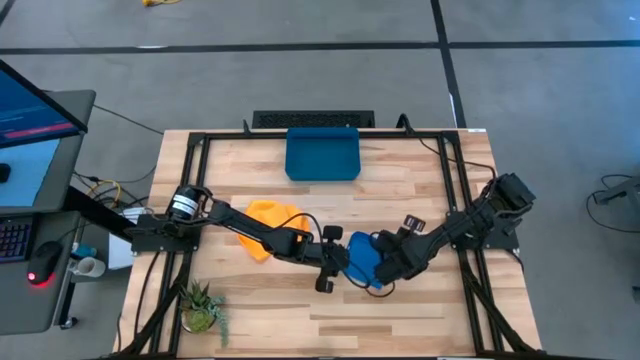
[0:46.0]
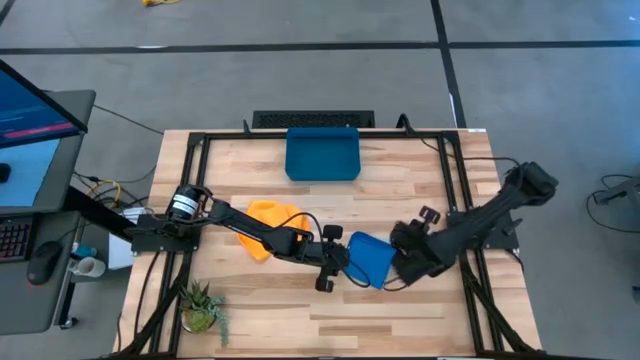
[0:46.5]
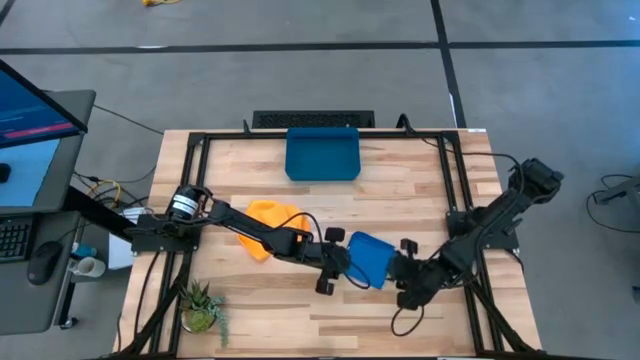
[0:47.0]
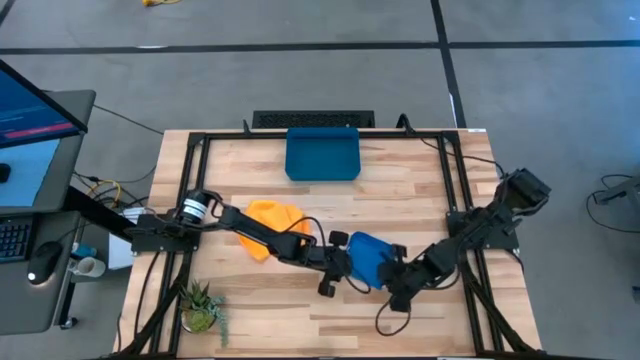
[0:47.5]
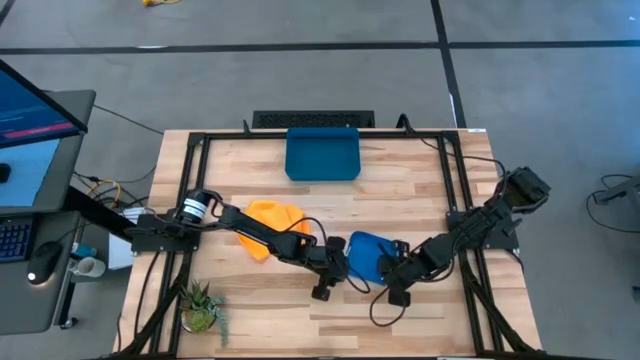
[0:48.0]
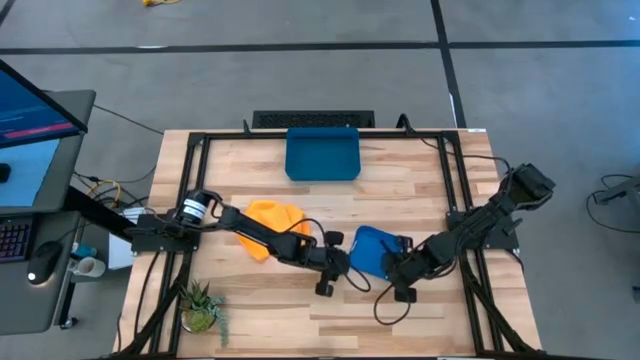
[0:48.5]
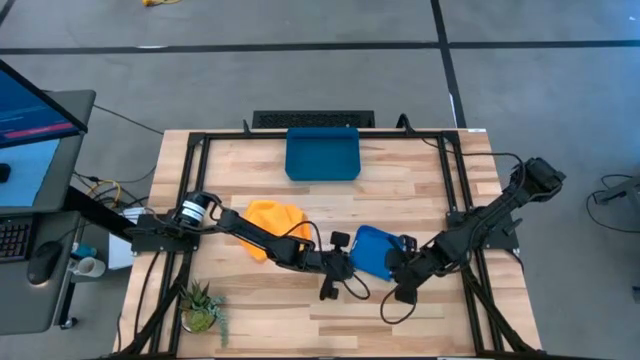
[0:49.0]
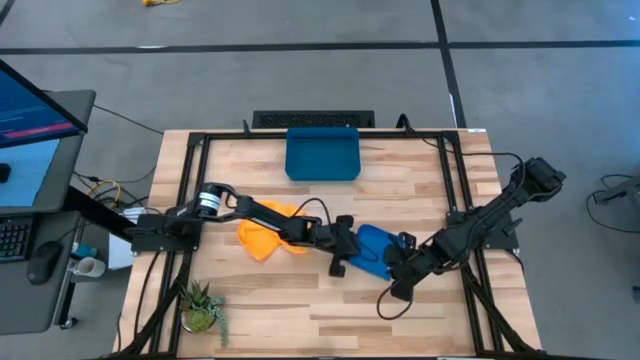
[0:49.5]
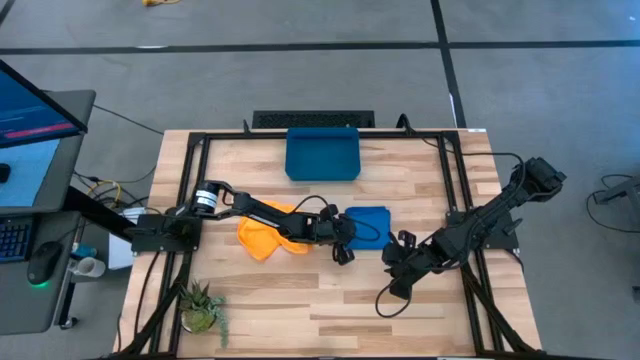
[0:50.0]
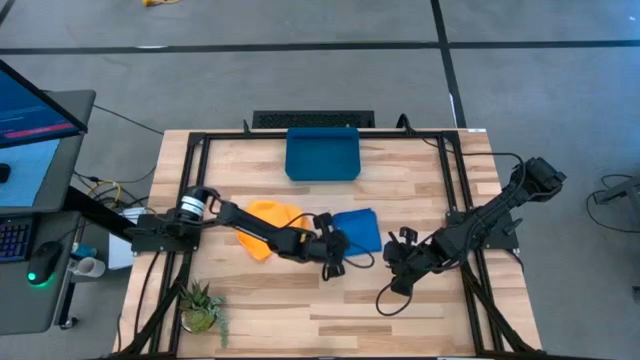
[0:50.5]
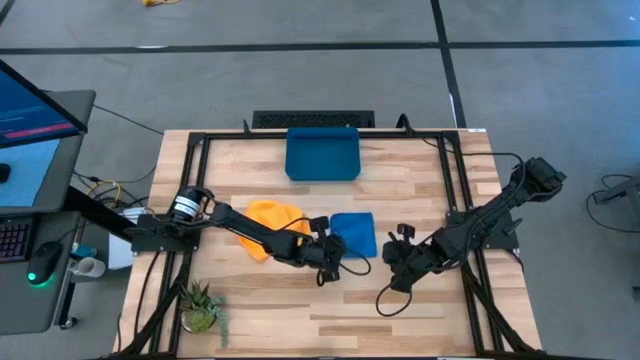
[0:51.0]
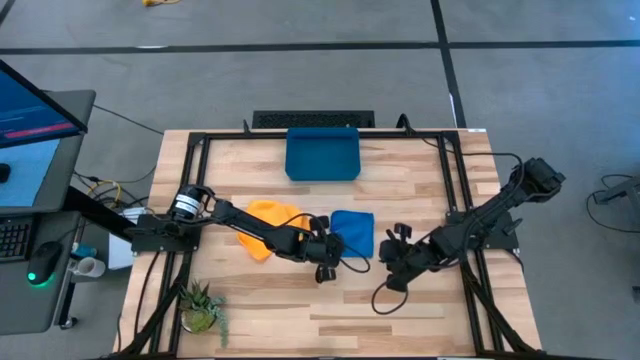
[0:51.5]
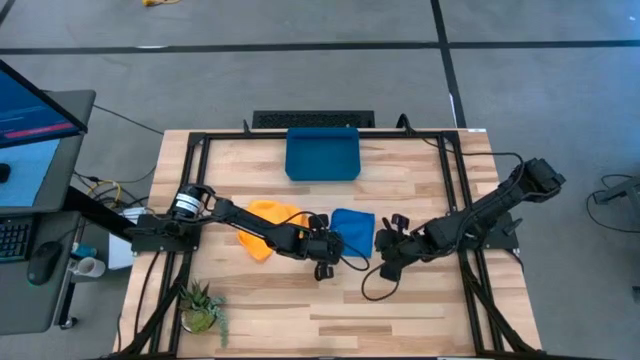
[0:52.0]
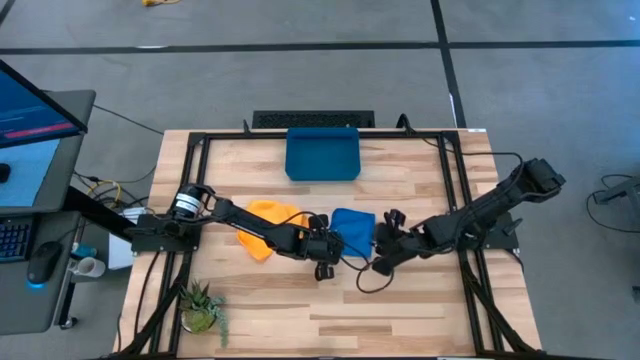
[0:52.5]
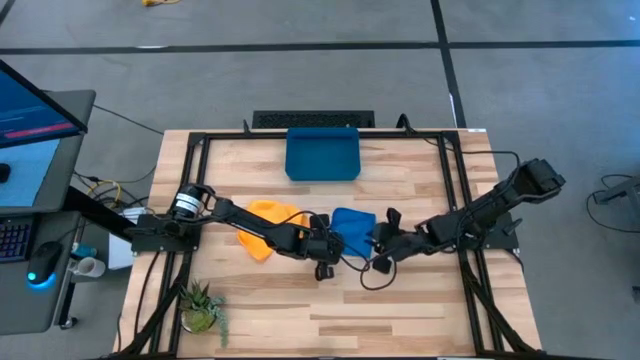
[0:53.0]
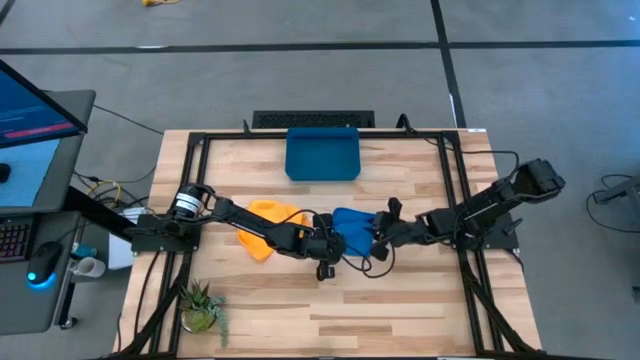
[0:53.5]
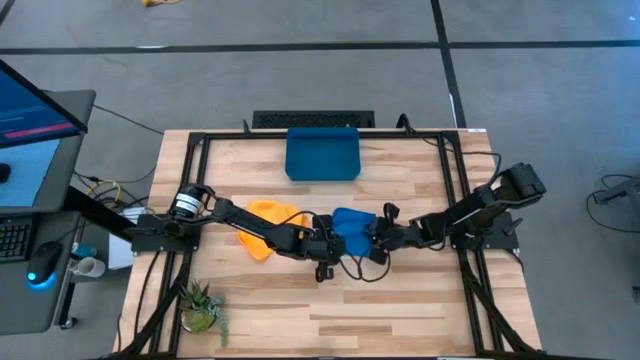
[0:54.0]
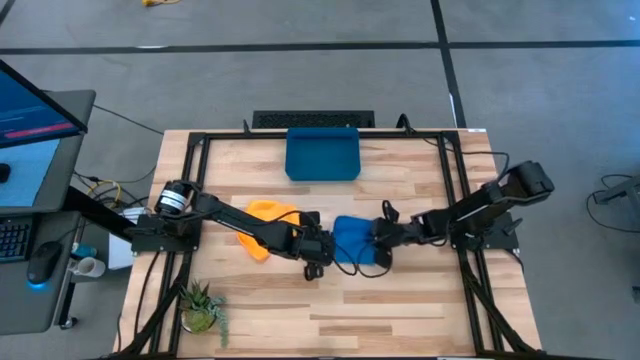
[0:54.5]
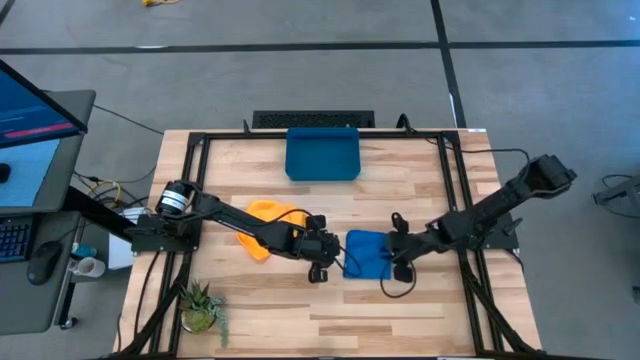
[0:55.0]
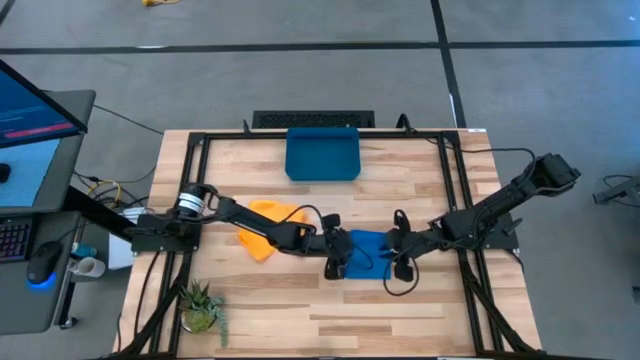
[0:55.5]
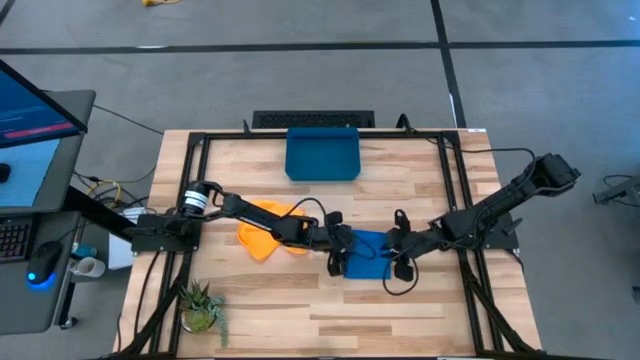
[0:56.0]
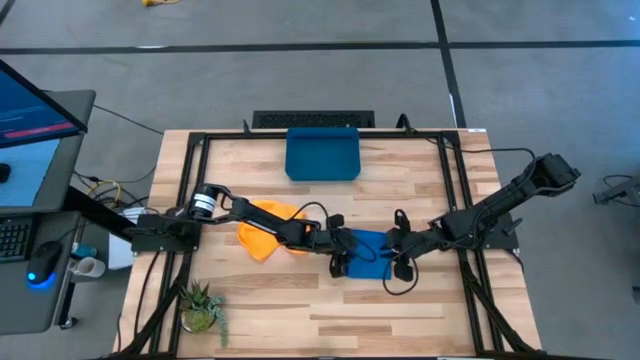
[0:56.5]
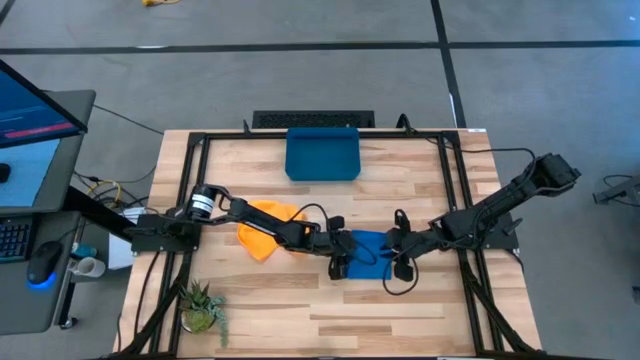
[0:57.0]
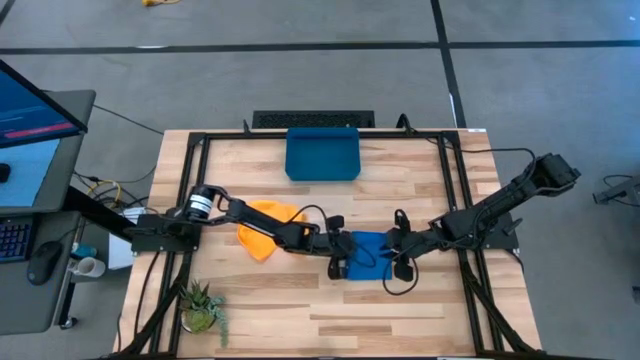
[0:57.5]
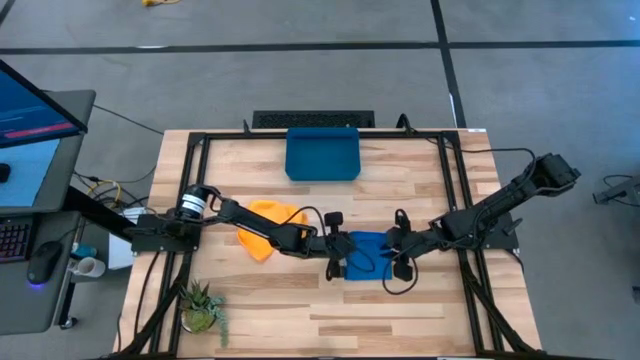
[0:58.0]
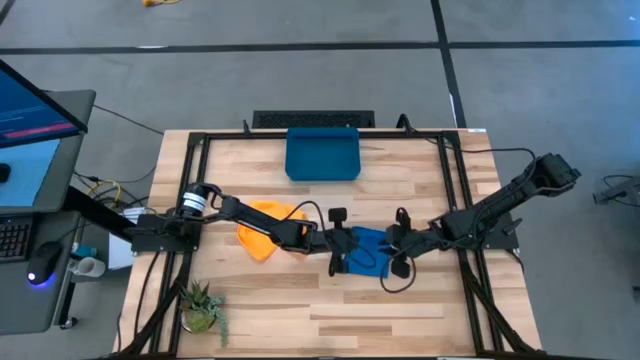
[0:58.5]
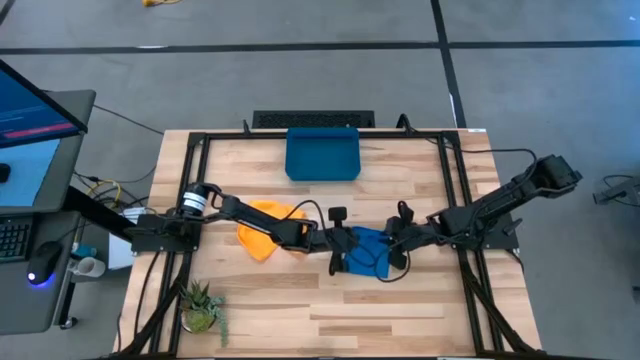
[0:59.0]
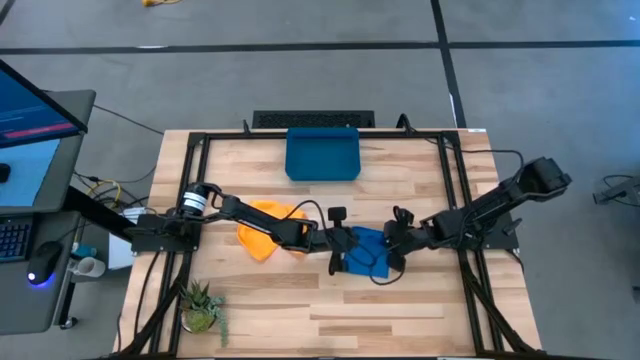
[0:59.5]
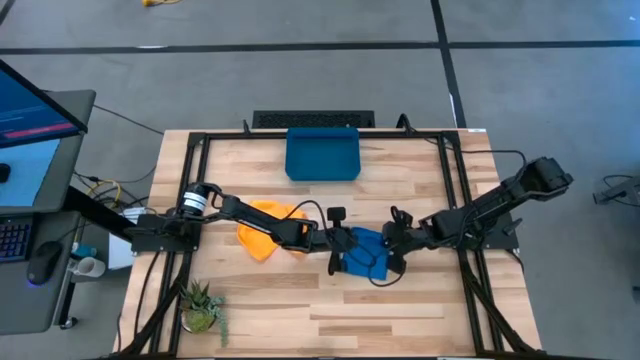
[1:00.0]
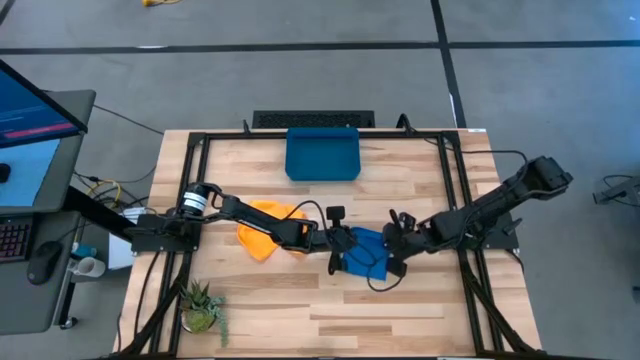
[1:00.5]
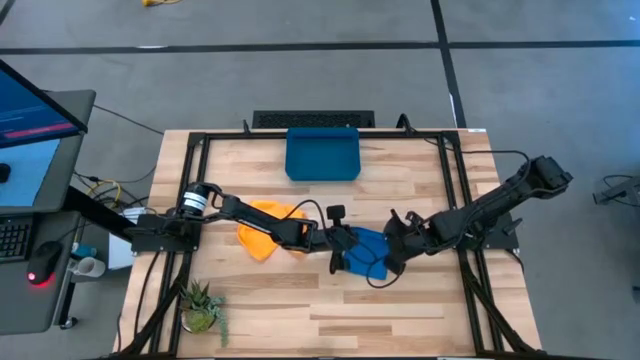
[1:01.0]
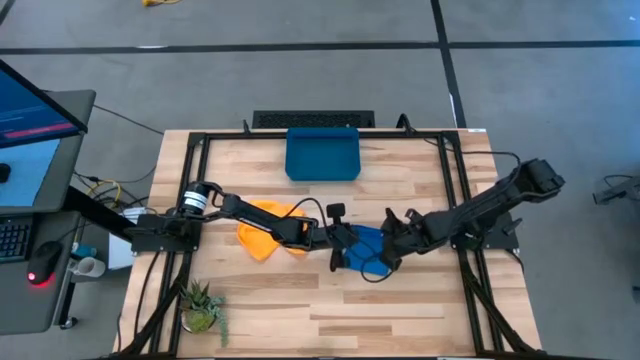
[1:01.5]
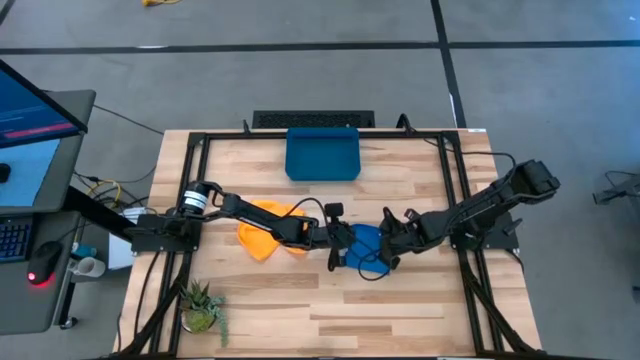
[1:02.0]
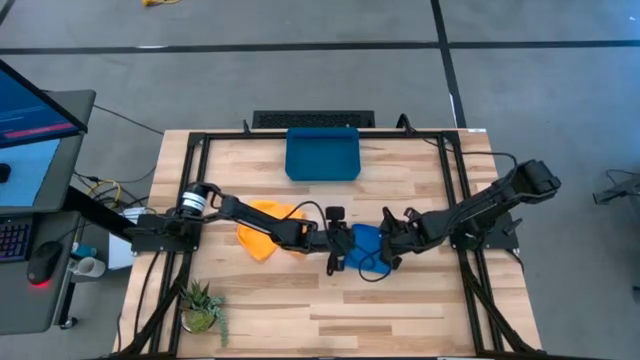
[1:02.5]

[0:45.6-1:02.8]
Task: Roll microfiber towels into tight, uniform cylinder then place into a basket
Fold the blue microfiber towel
